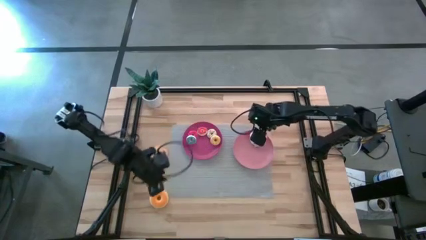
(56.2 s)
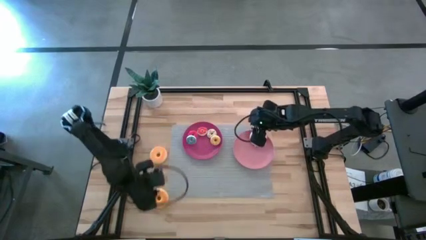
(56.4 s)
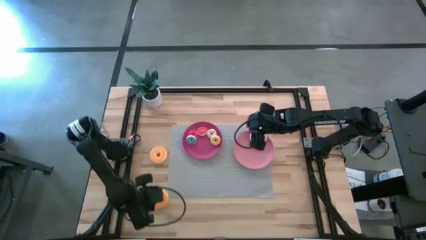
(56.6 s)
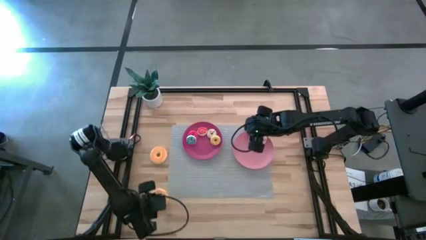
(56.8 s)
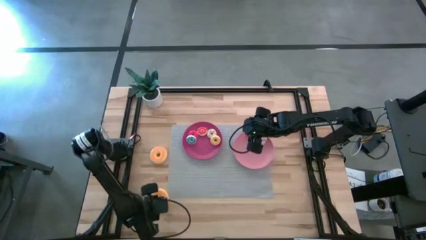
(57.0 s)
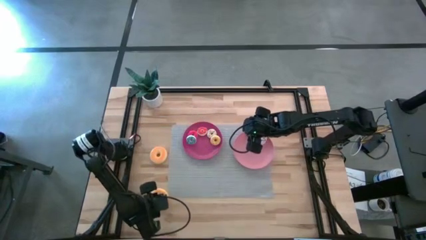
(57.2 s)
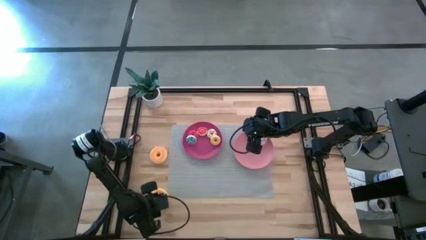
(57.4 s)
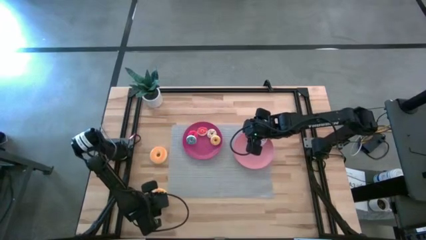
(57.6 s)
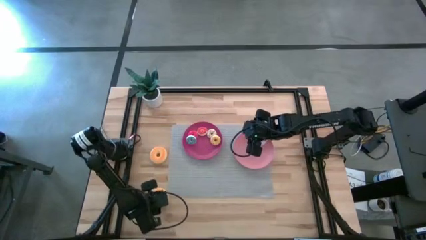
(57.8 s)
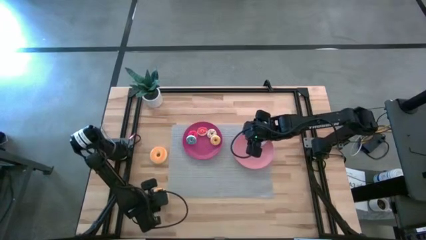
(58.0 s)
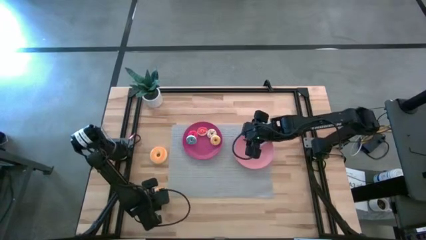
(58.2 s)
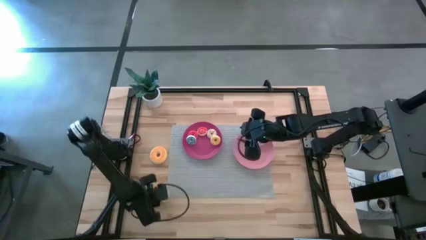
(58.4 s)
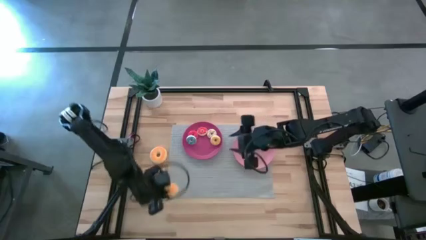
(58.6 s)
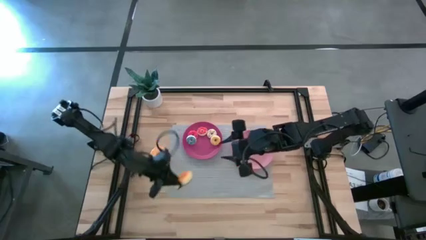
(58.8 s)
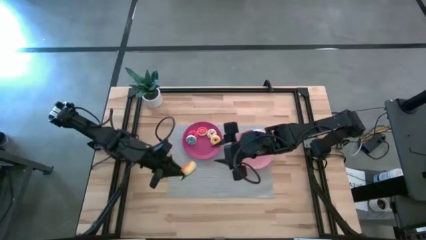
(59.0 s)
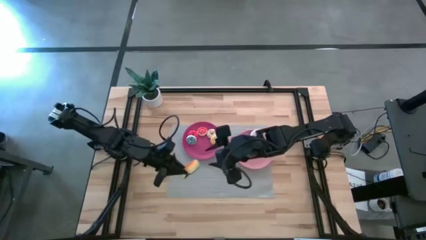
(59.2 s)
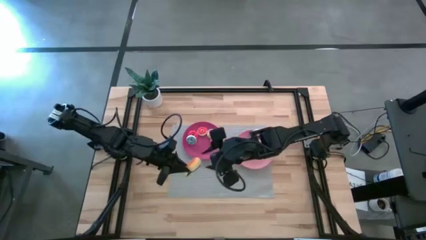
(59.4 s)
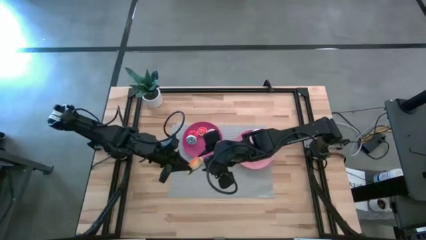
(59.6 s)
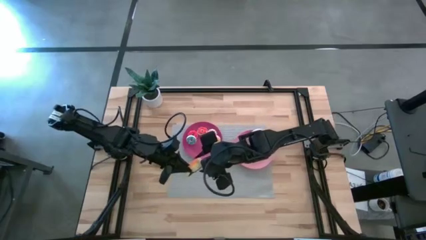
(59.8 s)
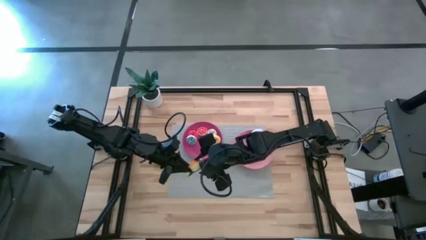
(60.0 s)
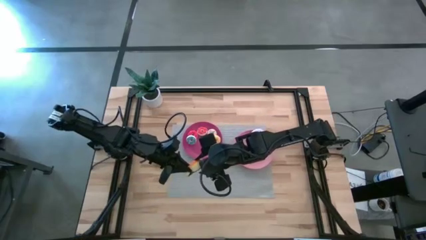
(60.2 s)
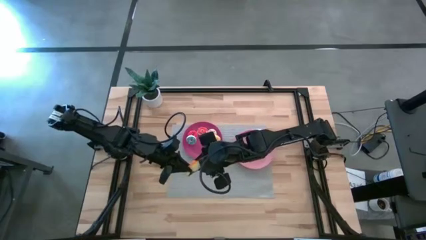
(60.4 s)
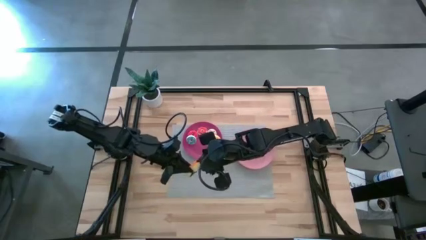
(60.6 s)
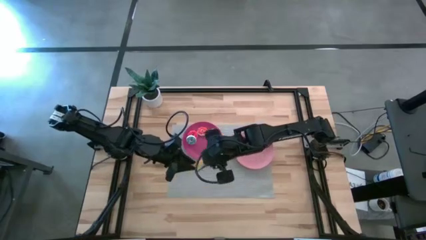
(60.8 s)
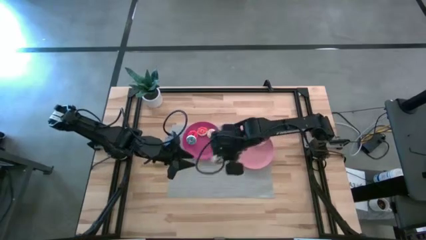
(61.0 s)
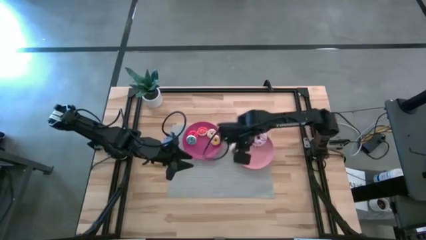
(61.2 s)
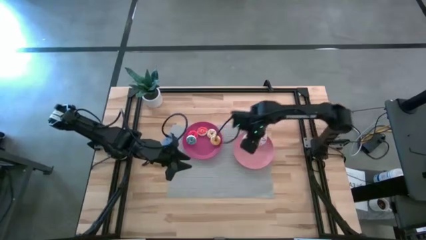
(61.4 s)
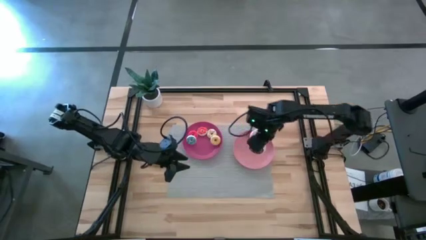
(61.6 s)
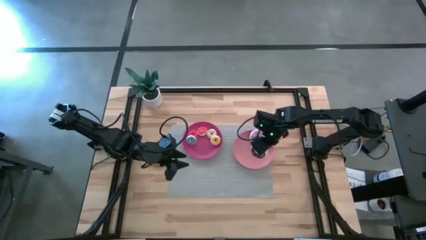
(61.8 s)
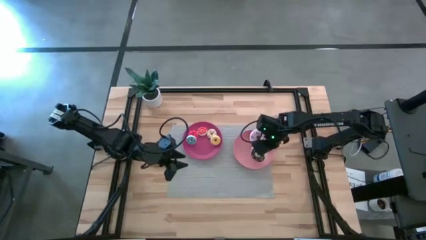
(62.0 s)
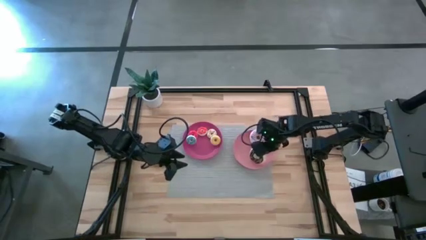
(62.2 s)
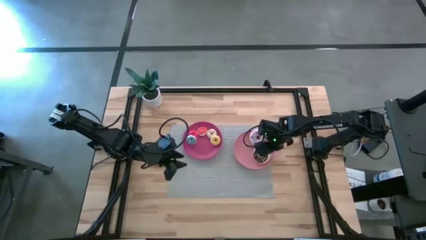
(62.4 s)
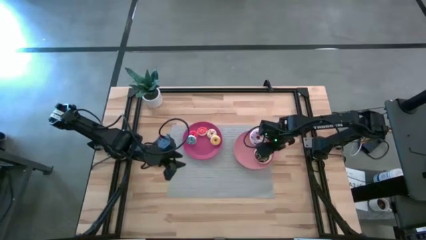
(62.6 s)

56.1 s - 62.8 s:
Task: Pick & Place donuts
Put the large dark brown donut on the light pink plate

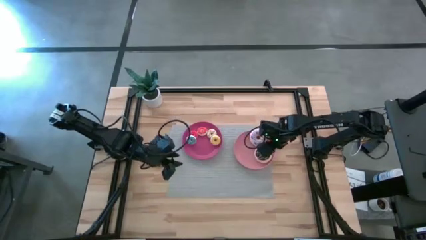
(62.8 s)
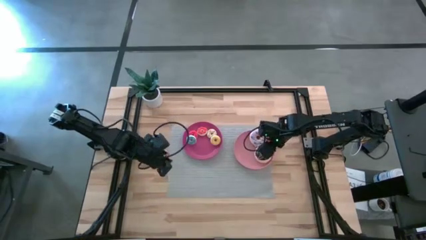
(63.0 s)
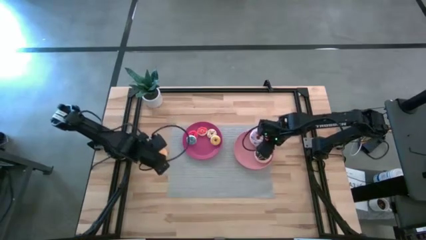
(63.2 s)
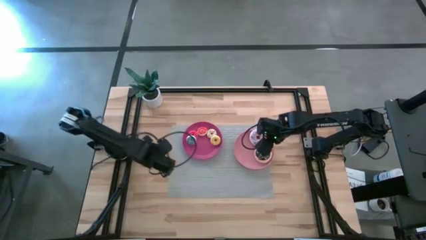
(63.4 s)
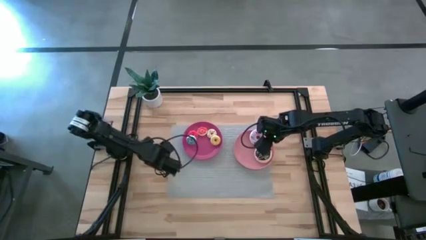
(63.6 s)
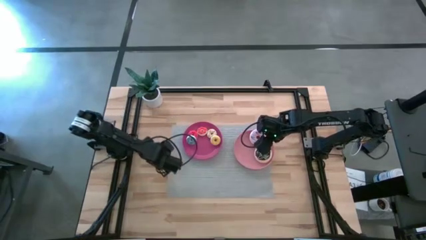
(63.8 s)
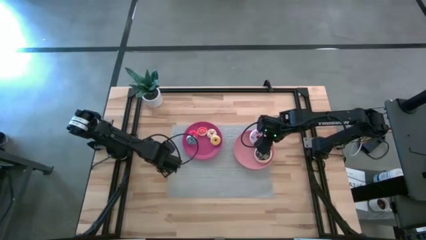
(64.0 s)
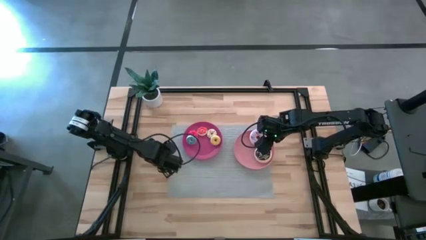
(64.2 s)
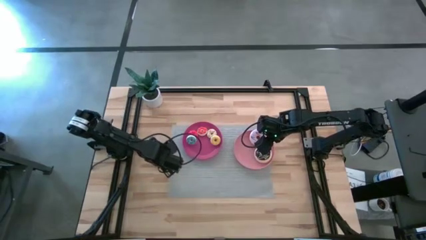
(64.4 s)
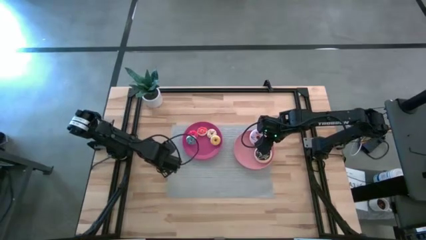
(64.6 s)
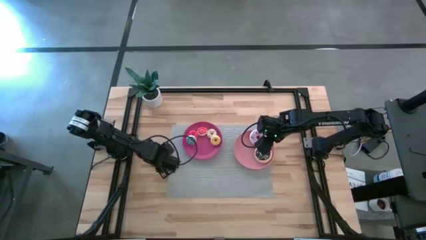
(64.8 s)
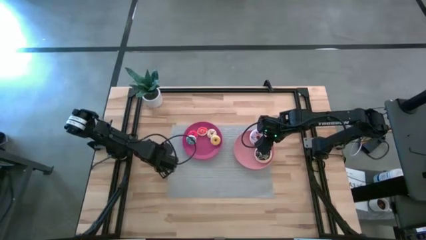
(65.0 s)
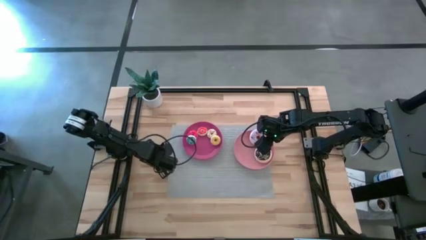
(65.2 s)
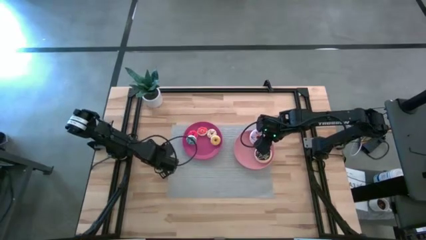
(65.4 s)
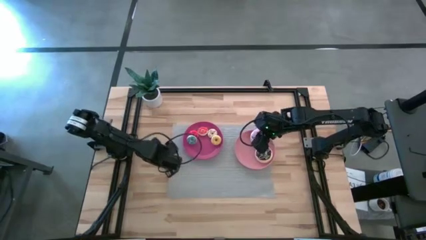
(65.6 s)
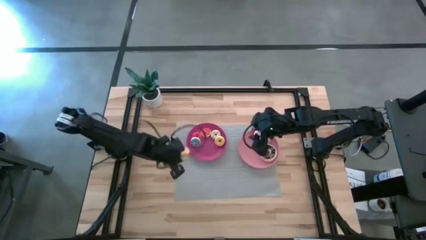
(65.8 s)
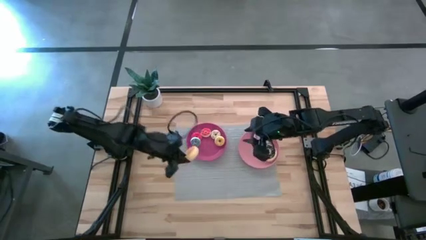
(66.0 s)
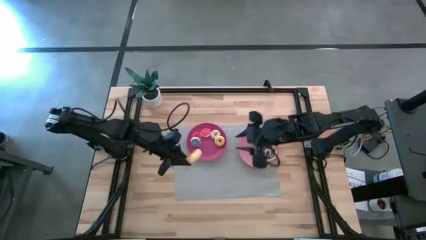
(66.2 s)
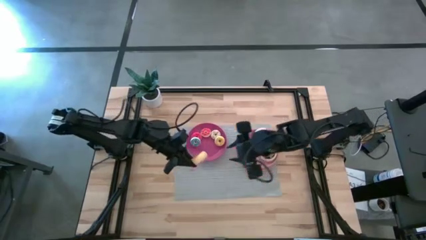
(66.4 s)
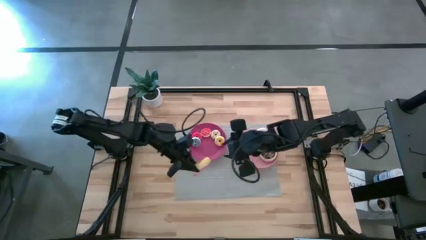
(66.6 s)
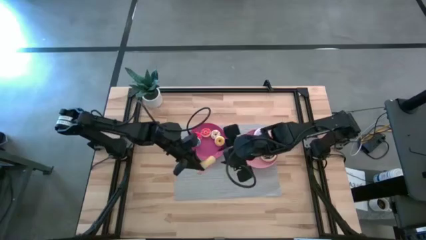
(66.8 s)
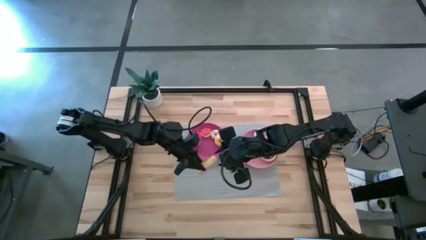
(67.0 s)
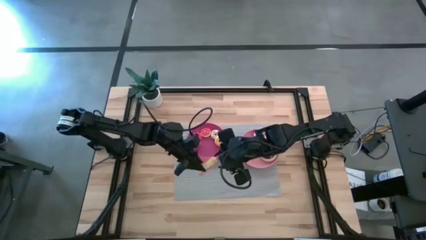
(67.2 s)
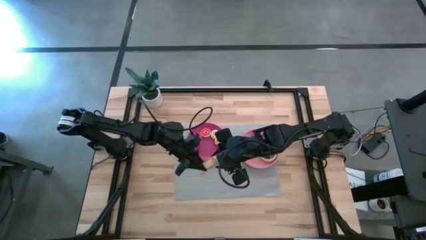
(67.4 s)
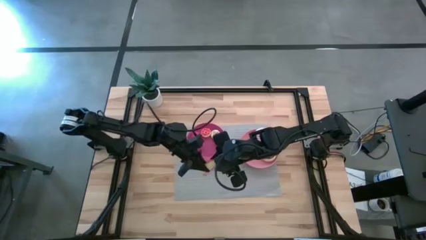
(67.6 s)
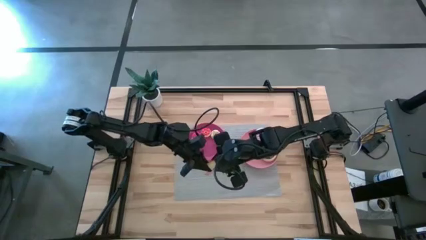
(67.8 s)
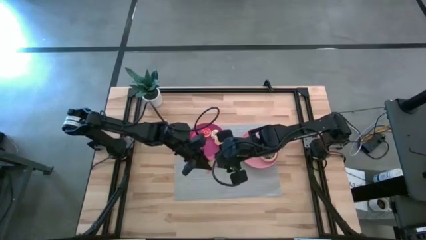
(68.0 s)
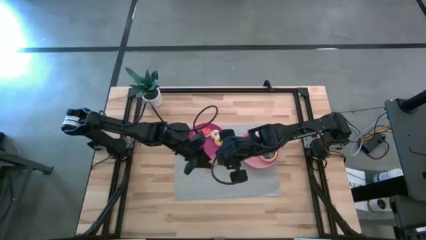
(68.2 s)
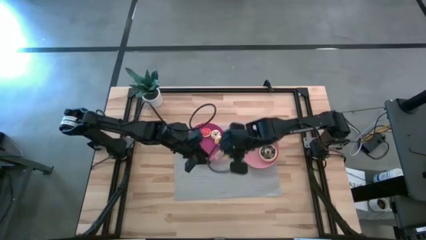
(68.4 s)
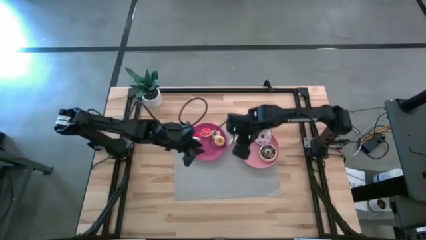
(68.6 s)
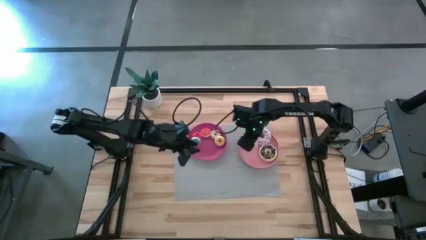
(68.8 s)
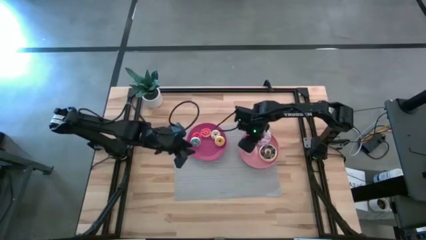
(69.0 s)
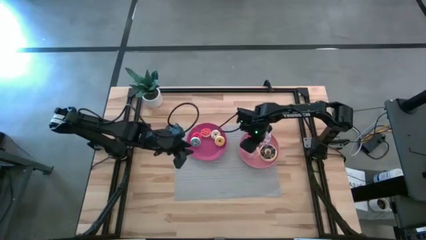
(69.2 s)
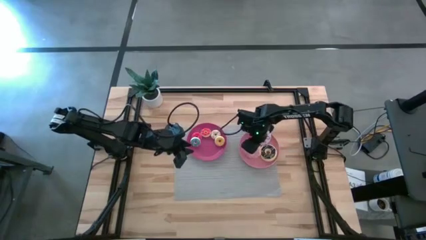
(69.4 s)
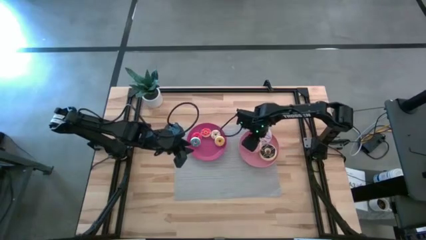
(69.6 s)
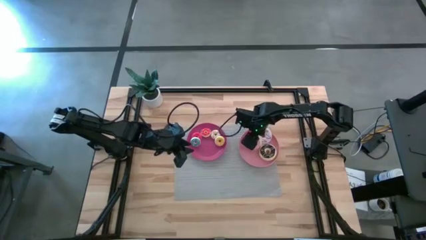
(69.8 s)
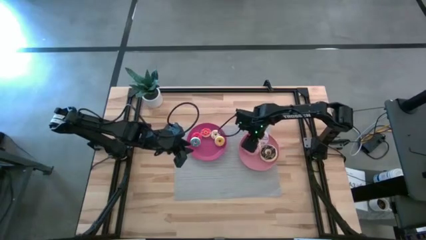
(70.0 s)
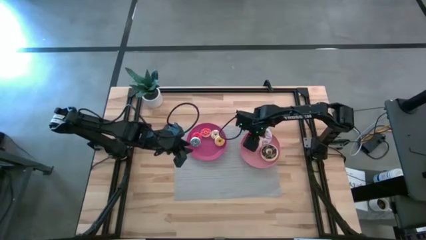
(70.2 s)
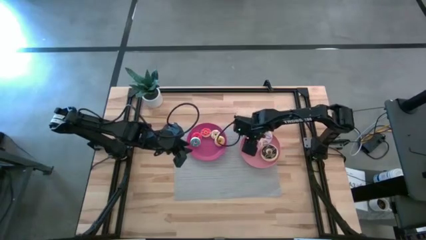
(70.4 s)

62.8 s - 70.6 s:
Put the large pink donut on the light pink plate

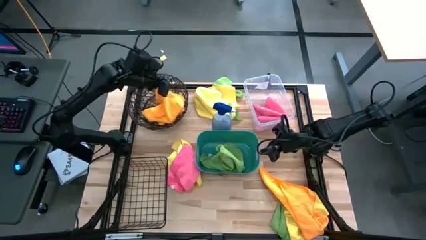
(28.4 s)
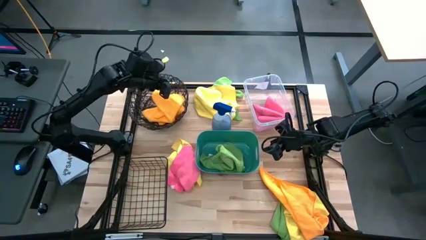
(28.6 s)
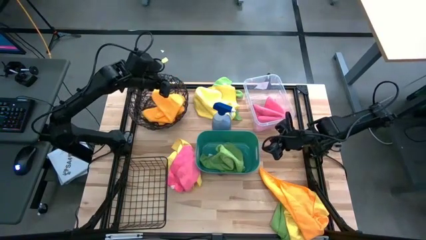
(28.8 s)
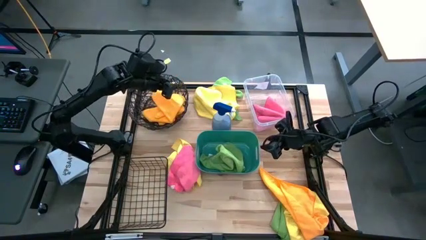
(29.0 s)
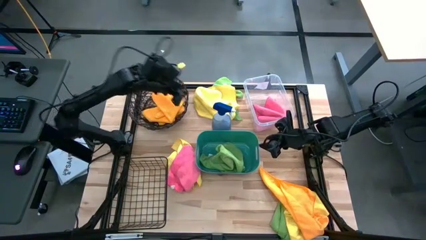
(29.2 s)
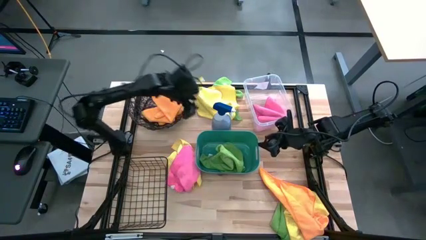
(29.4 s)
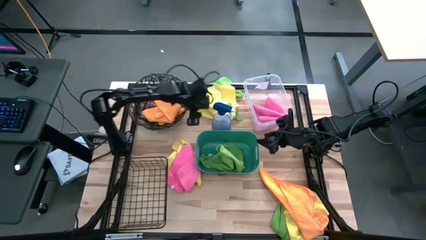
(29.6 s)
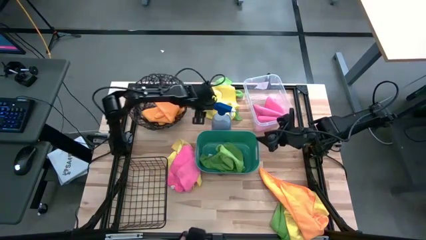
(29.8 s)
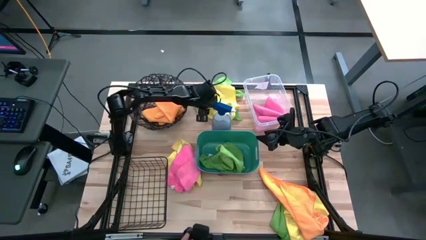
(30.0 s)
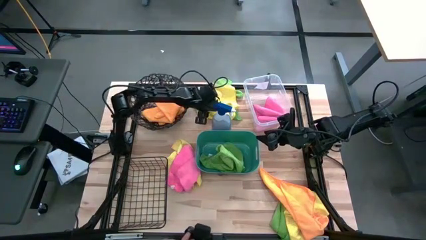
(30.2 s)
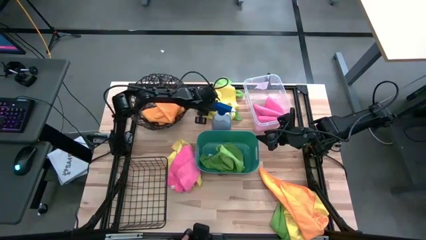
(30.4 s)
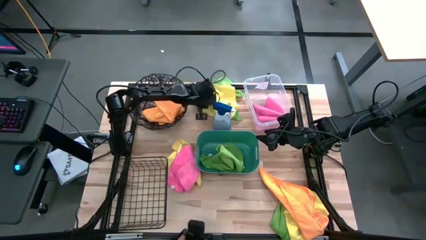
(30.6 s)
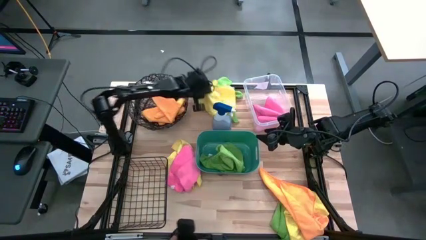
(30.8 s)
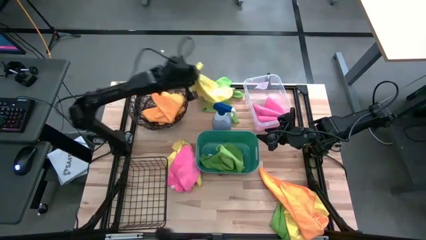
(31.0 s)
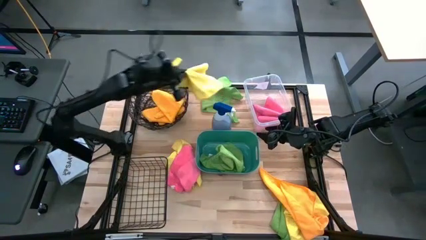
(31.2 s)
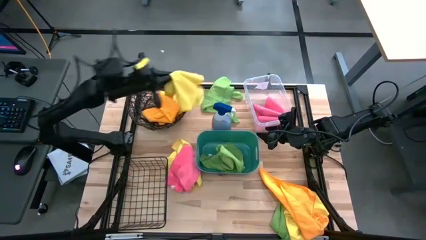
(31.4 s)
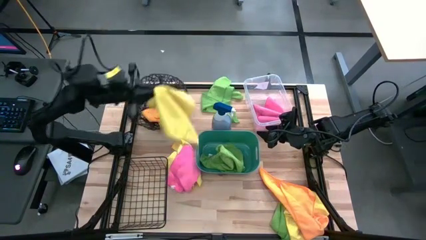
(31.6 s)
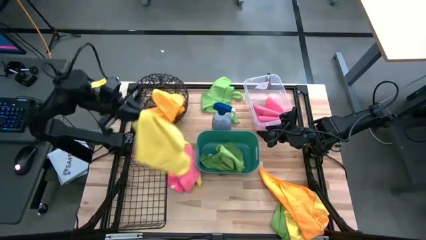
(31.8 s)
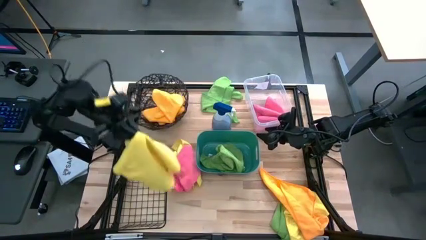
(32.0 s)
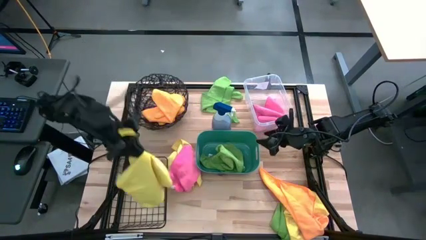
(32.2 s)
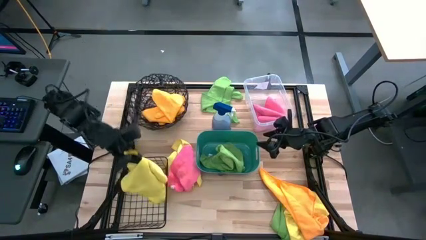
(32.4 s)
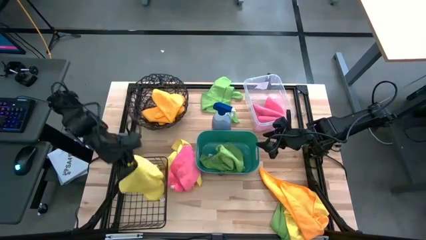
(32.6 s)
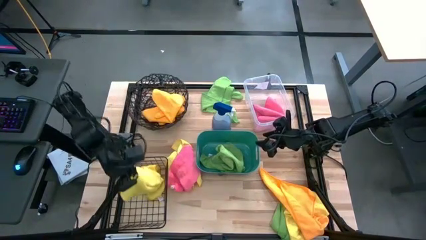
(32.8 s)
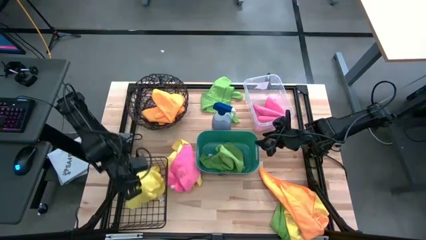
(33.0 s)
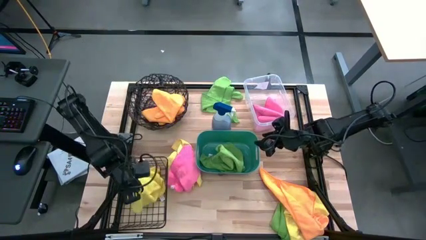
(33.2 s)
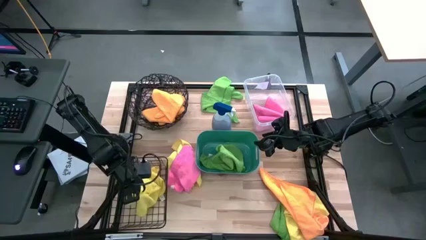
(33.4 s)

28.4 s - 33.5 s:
Task: Sort microfiber towel by color & place in baskets
Put the yellow towel into the wire basket
